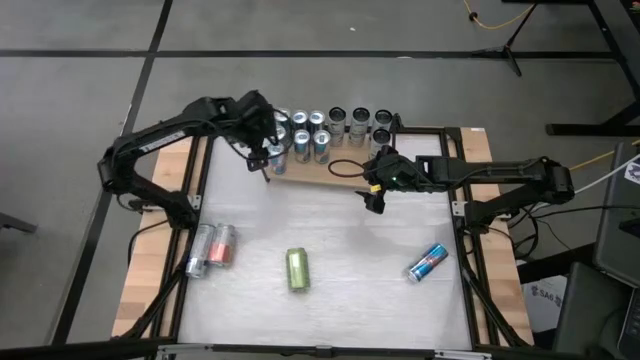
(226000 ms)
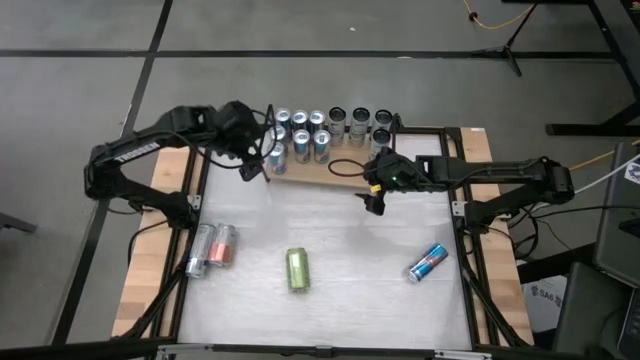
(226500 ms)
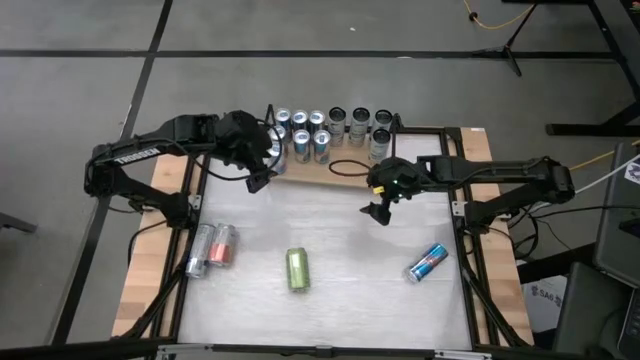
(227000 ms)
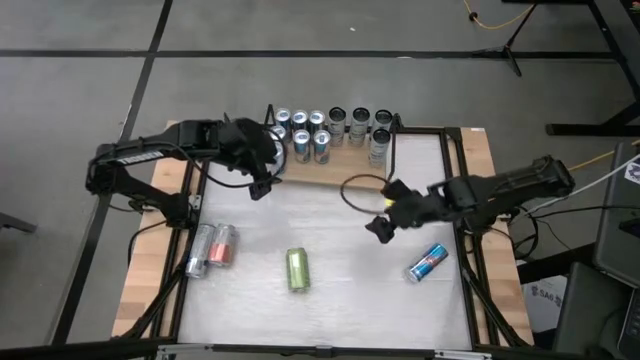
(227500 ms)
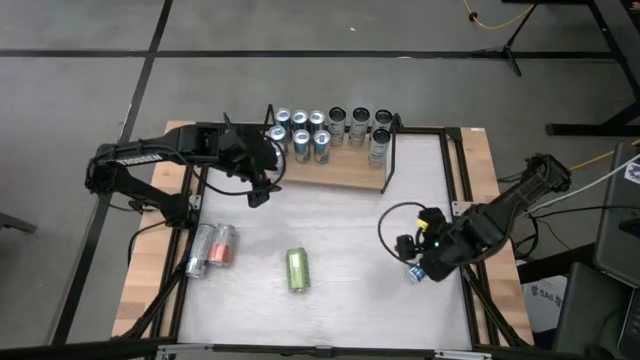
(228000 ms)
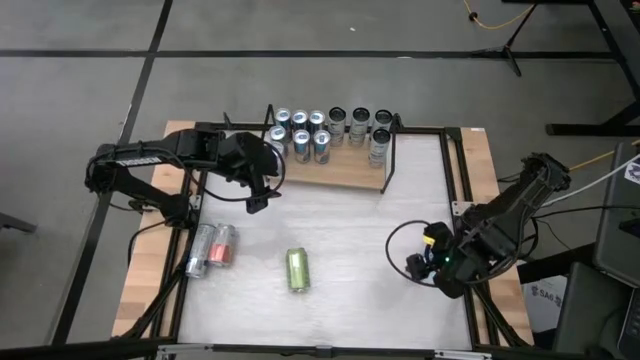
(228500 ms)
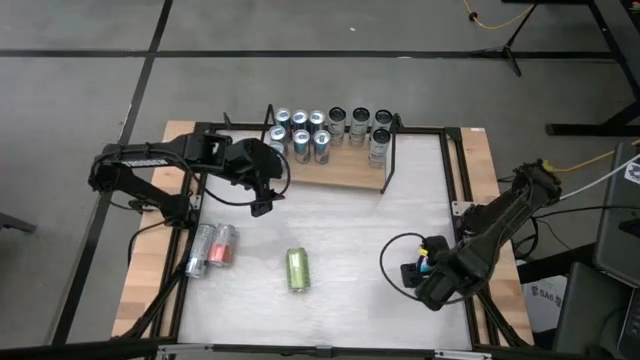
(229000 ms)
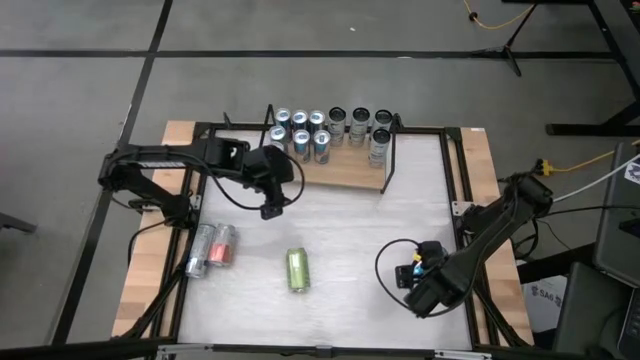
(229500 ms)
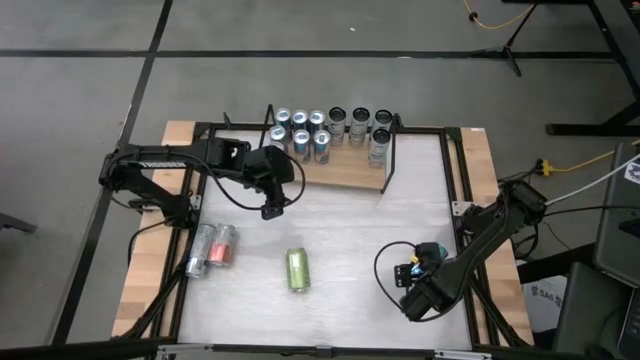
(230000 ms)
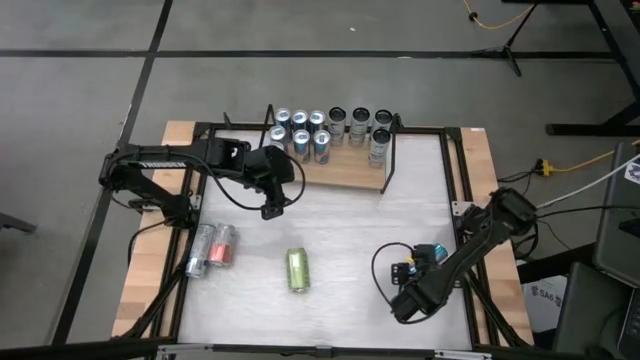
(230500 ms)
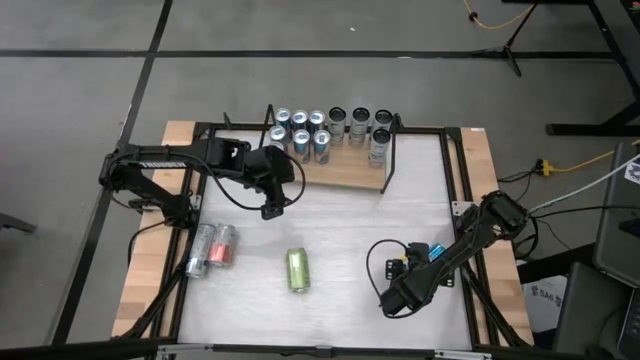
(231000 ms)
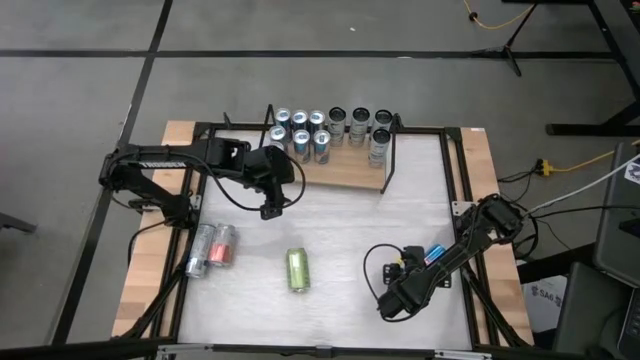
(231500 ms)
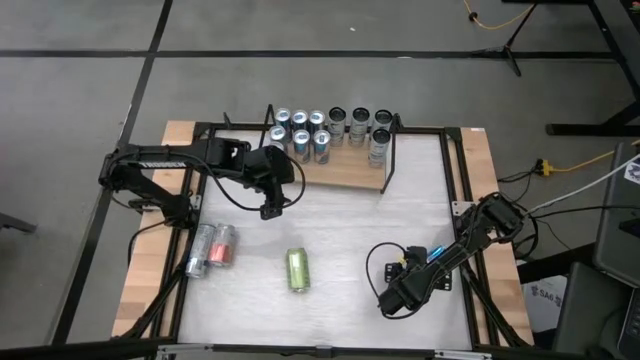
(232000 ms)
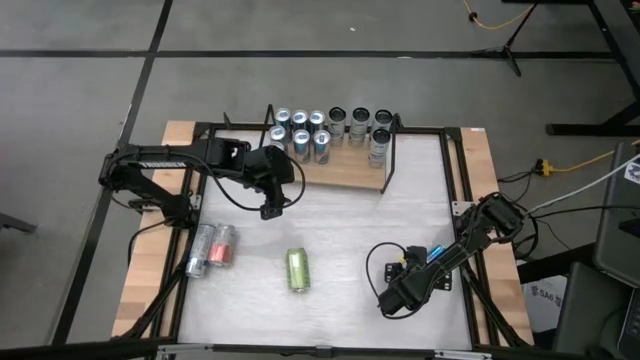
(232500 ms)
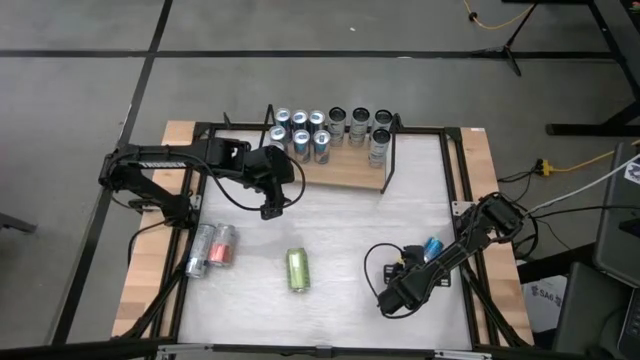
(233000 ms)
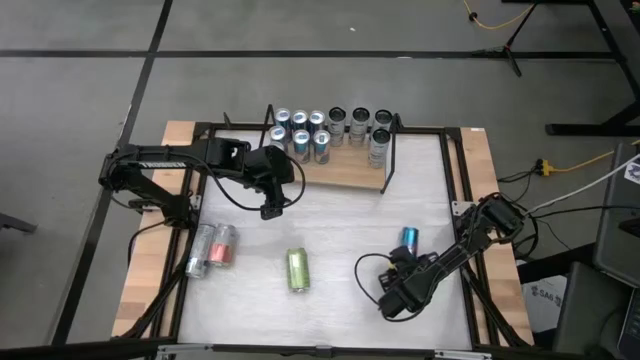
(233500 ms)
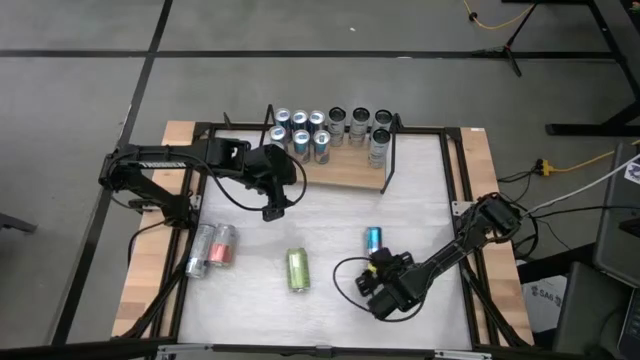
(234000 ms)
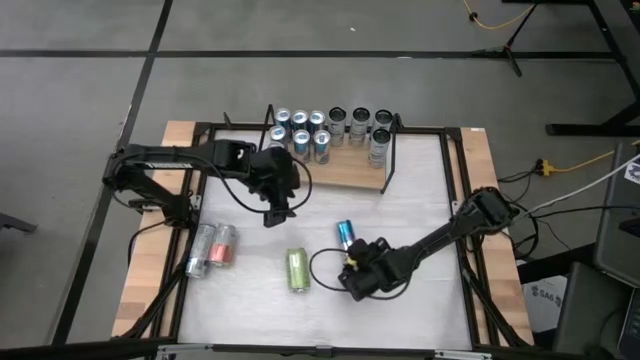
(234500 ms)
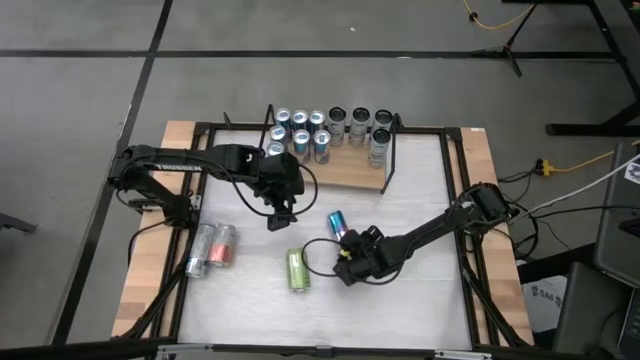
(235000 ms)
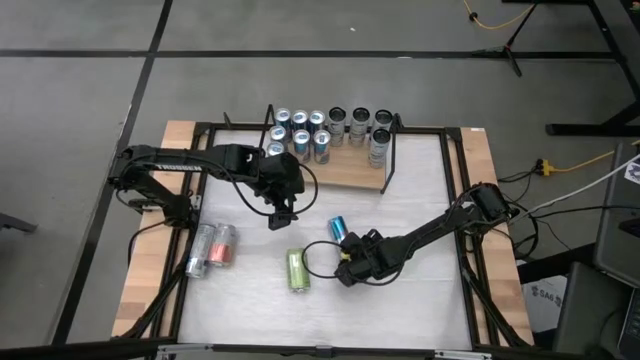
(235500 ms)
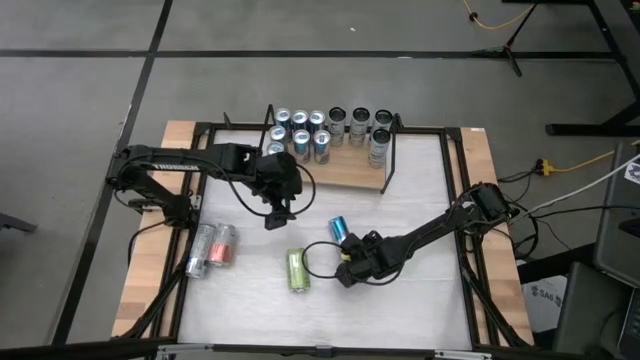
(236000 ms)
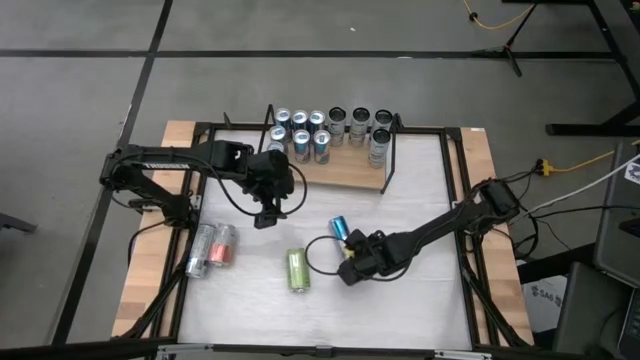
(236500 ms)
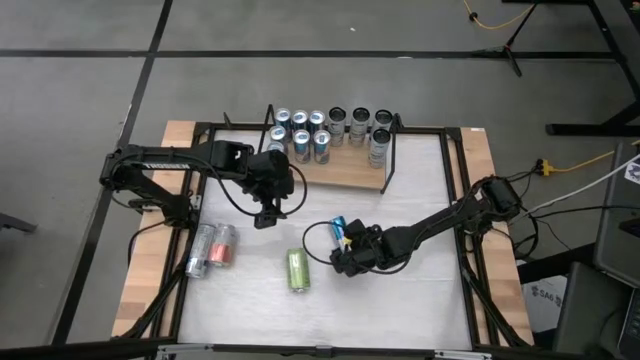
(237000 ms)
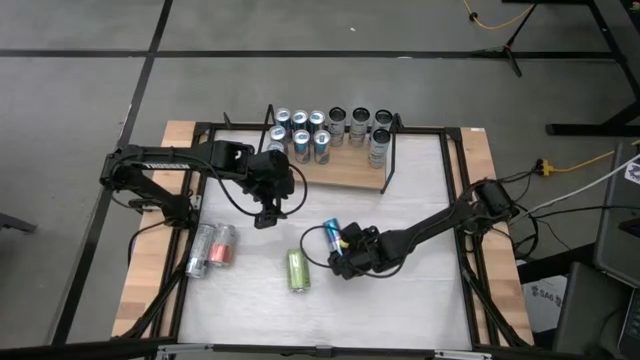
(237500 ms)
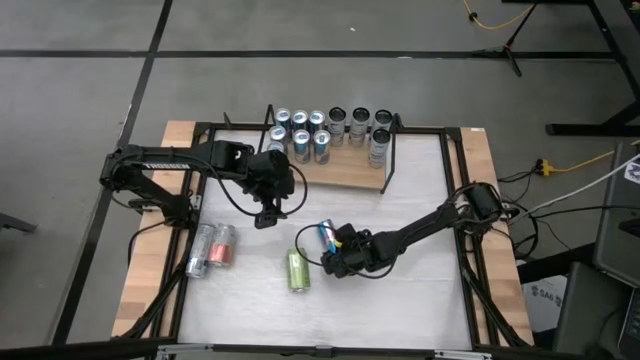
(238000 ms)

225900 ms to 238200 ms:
Task: Place canned beverage on shelf
Put the blue soda can on the shelf aligned with the other blue soda can

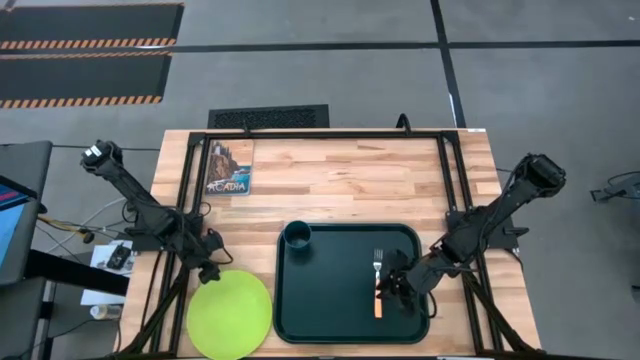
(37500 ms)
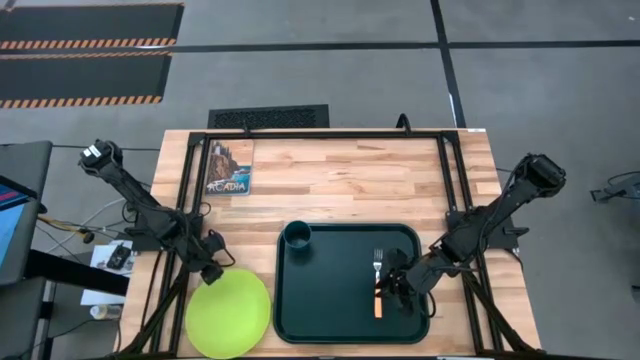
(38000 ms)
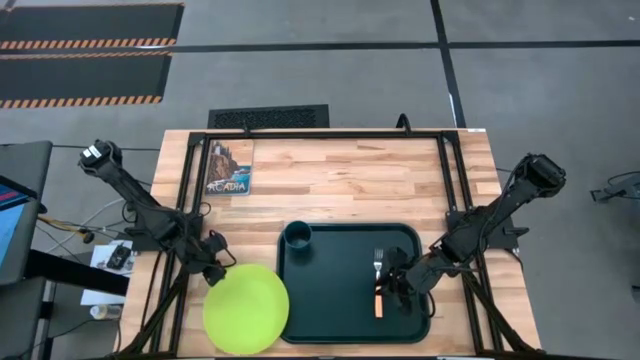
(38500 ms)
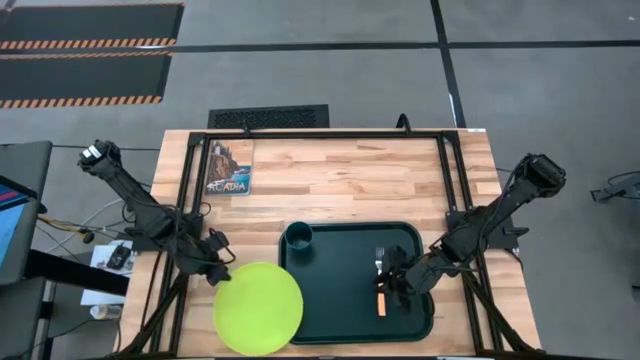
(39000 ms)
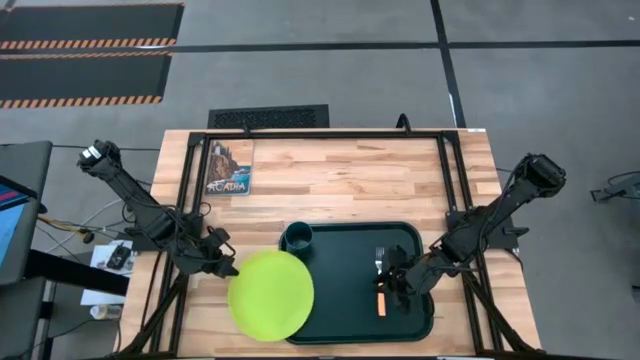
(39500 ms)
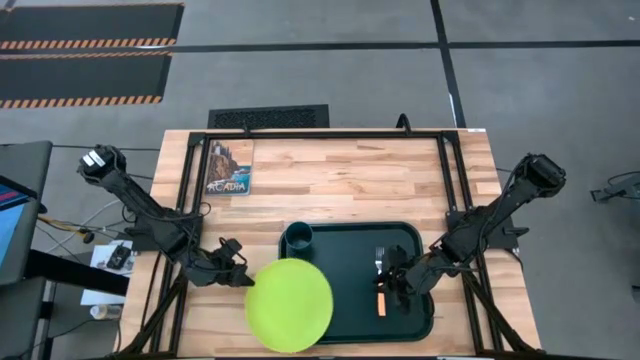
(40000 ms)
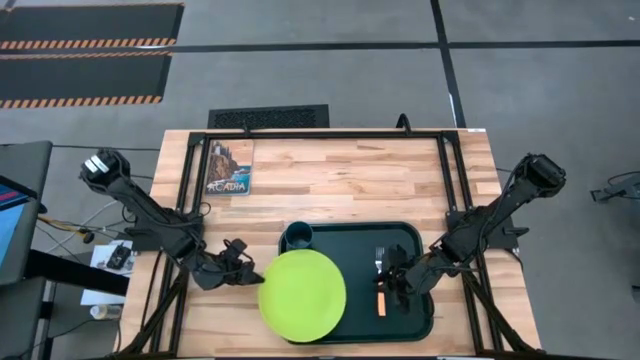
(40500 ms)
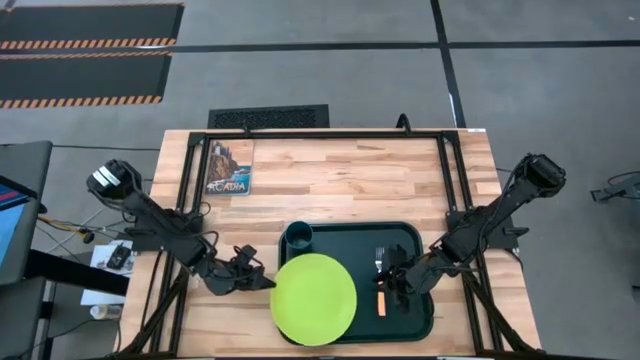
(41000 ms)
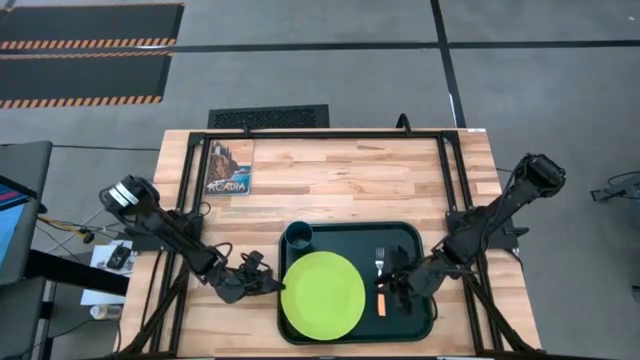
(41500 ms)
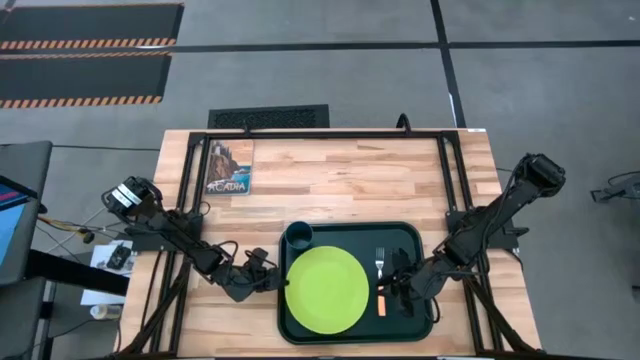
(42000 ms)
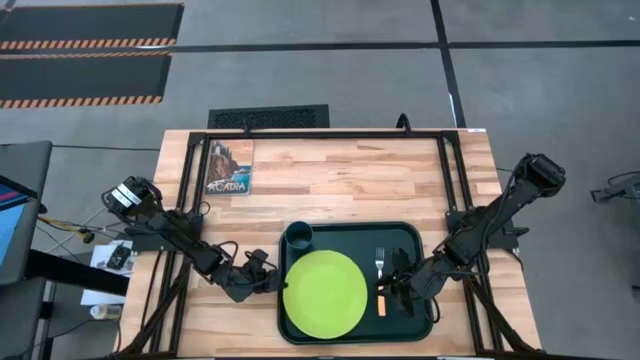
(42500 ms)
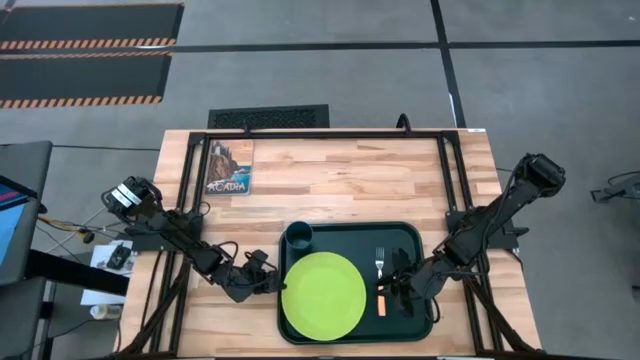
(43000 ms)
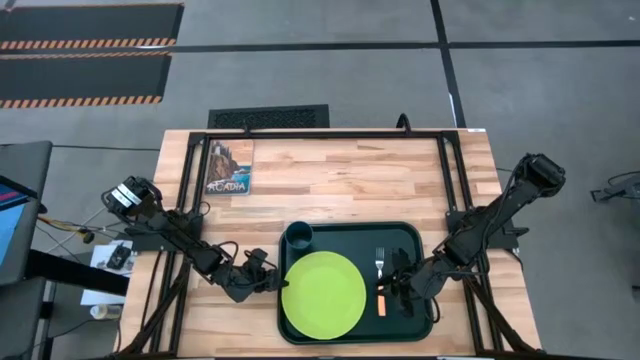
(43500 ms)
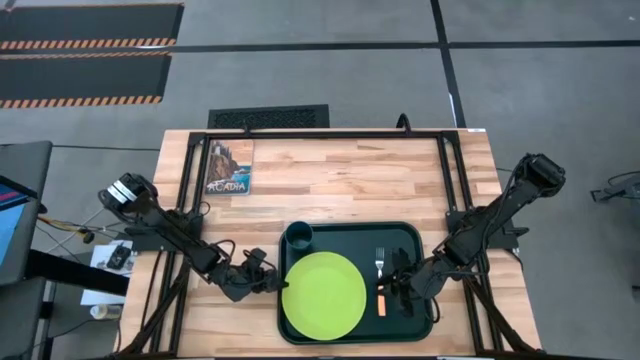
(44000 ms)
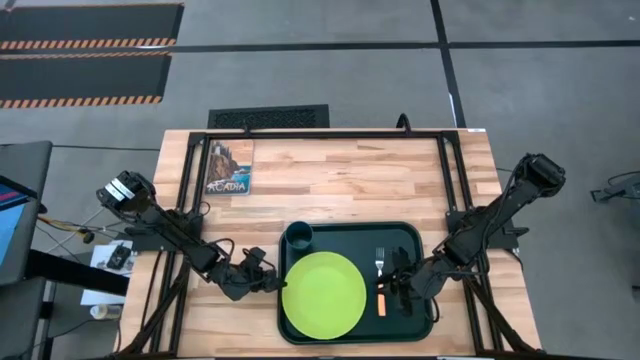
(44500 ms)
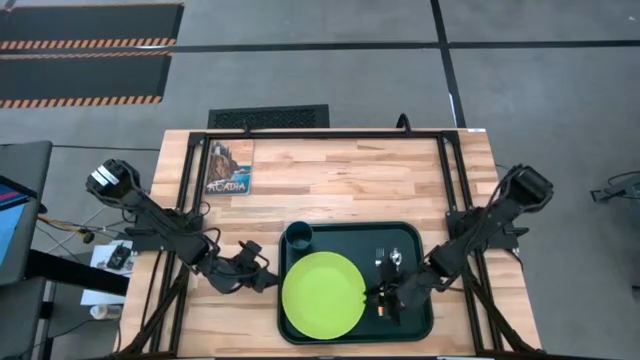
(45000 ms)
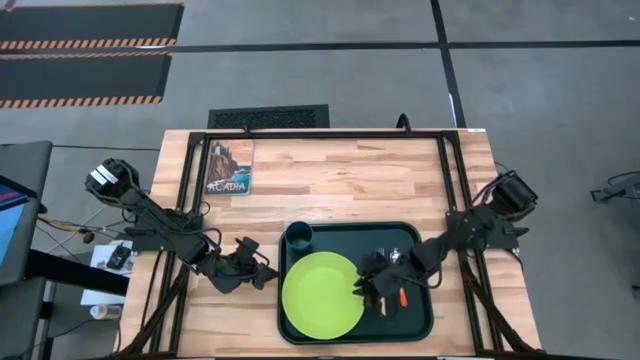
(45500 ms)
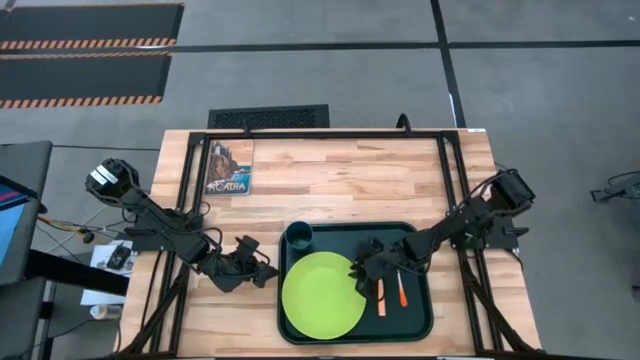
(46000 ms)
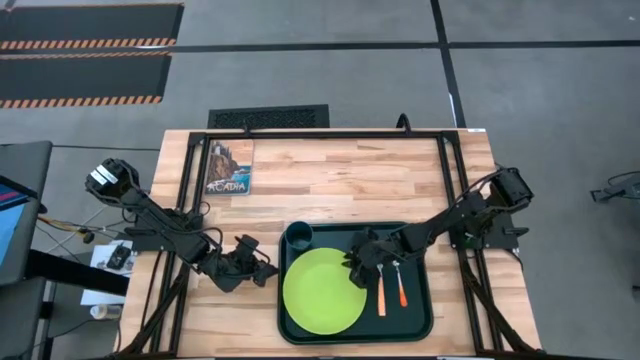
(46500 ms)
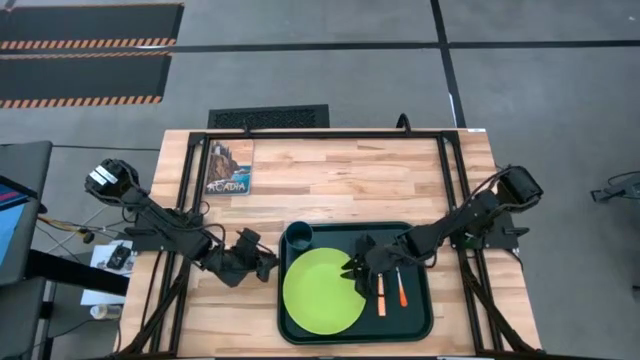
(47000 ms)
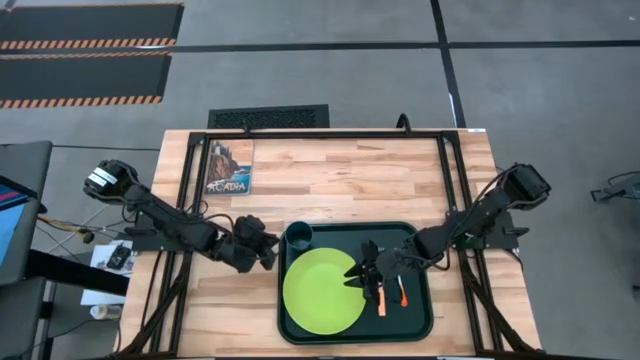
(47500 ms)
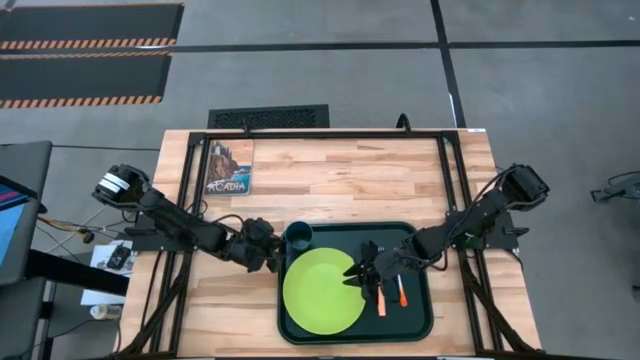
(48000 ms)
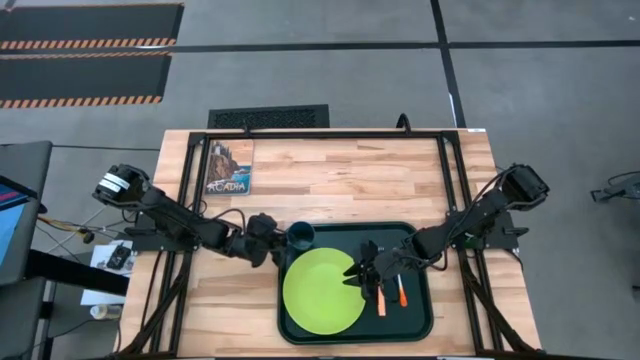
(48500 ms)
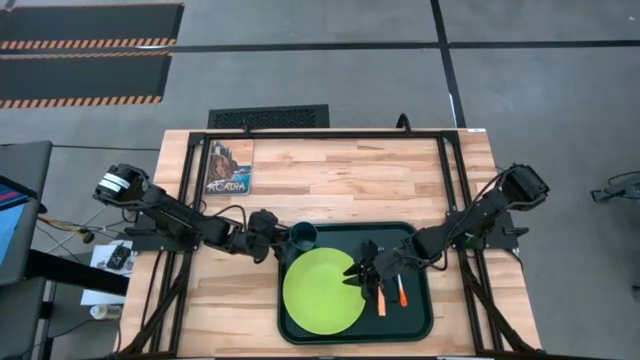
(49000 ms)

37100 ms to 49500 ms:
Task: Pick and place plate/cup/fork/spoon on tray
Put the light green plate on the black tray to the left of the light orange fork
